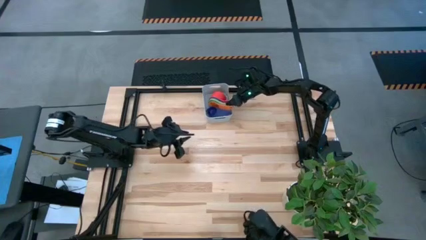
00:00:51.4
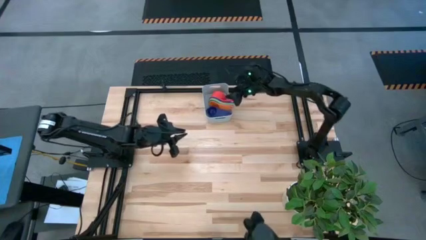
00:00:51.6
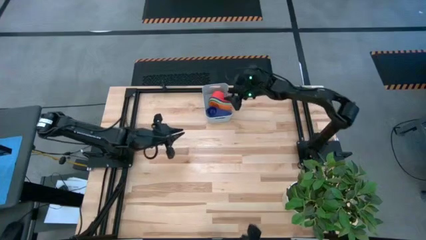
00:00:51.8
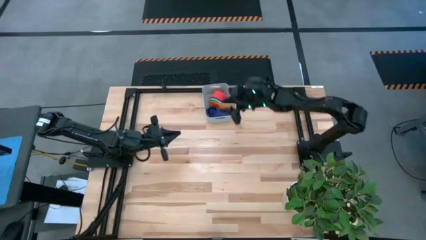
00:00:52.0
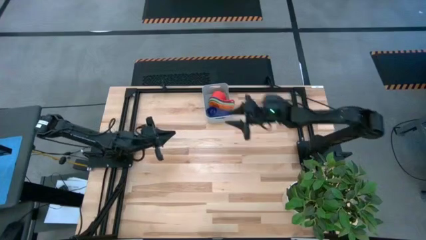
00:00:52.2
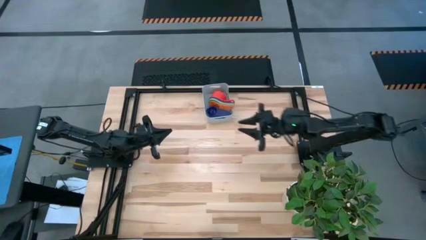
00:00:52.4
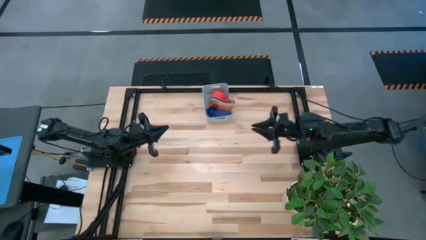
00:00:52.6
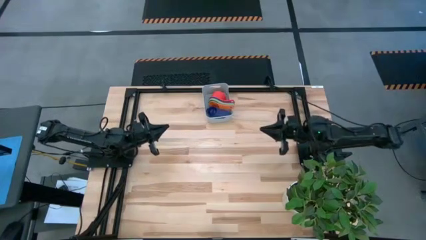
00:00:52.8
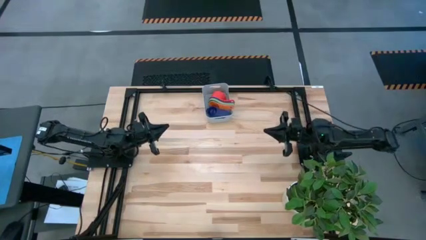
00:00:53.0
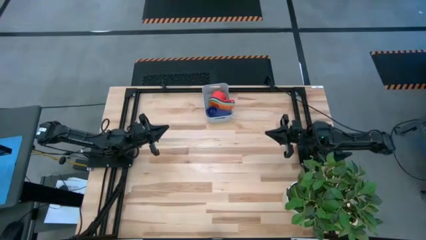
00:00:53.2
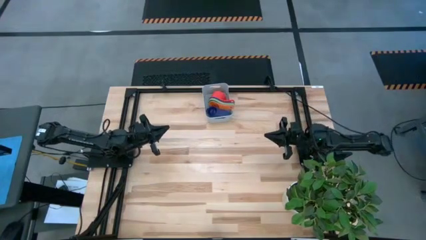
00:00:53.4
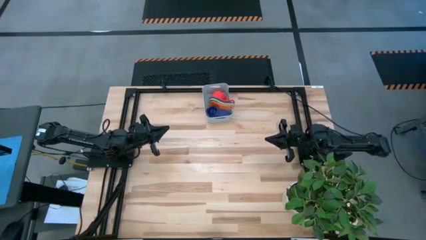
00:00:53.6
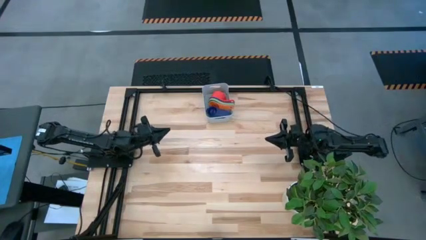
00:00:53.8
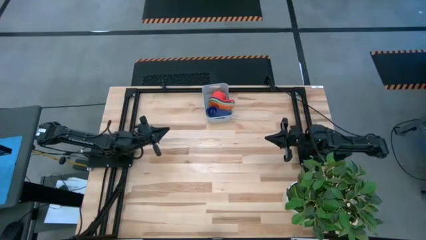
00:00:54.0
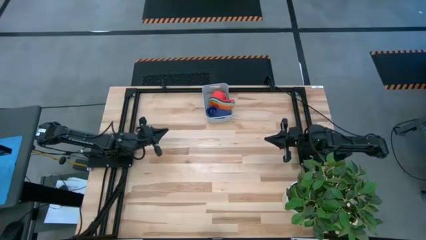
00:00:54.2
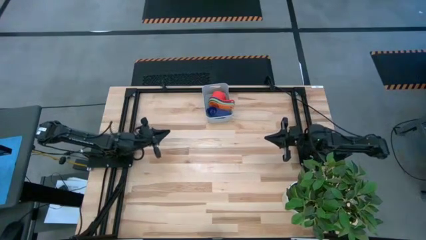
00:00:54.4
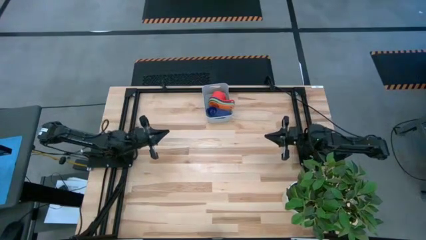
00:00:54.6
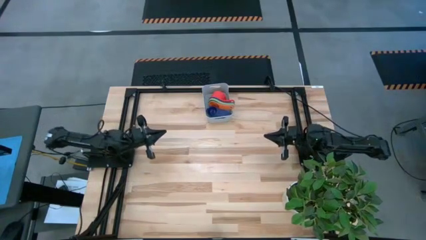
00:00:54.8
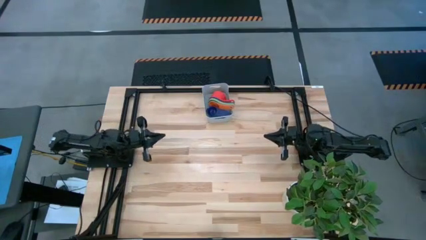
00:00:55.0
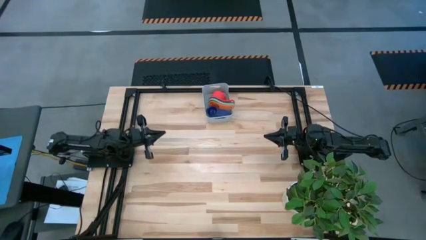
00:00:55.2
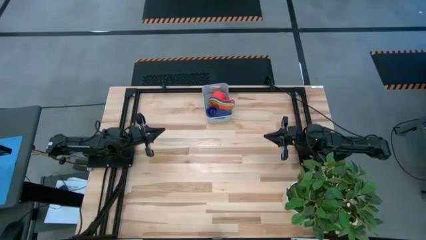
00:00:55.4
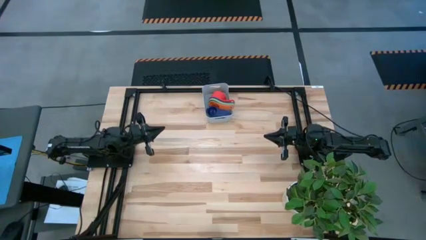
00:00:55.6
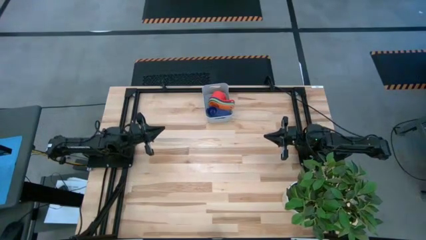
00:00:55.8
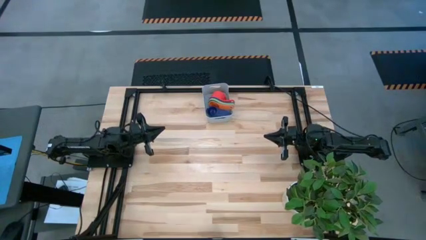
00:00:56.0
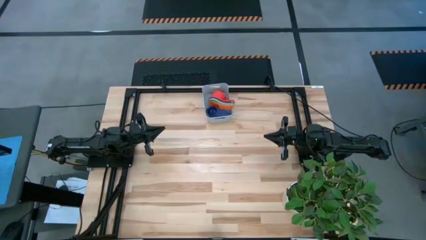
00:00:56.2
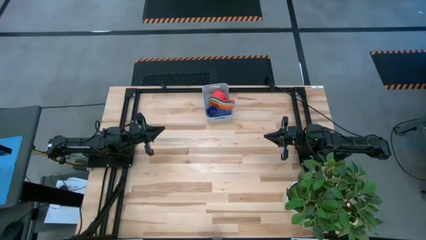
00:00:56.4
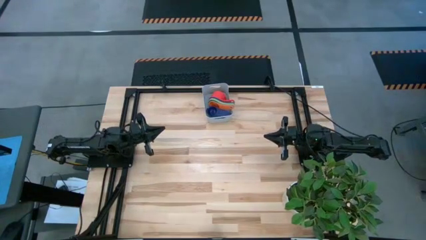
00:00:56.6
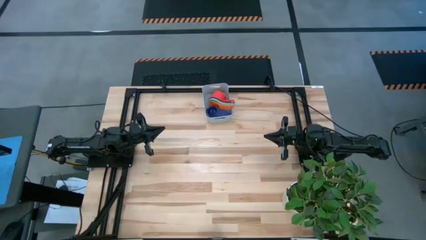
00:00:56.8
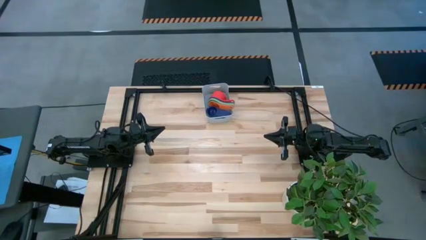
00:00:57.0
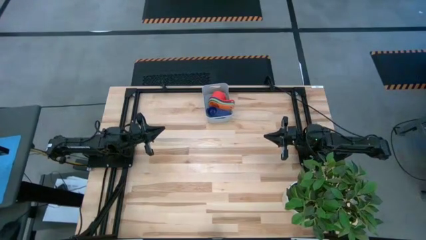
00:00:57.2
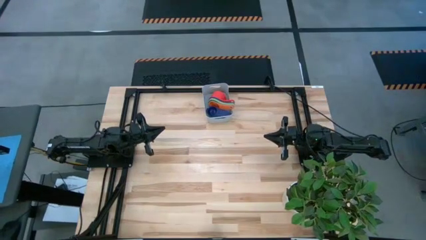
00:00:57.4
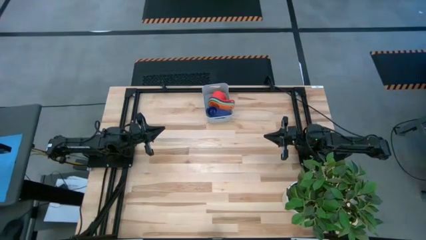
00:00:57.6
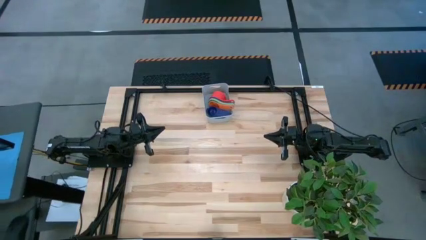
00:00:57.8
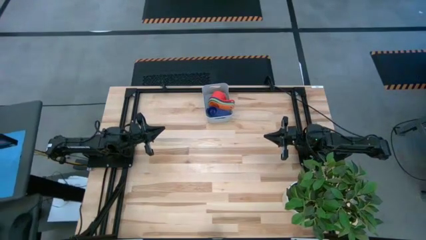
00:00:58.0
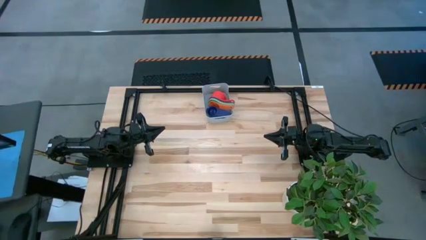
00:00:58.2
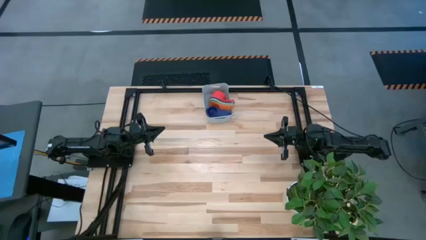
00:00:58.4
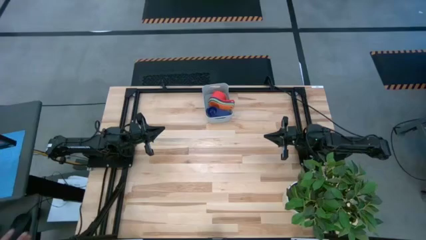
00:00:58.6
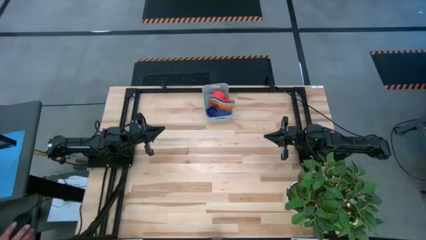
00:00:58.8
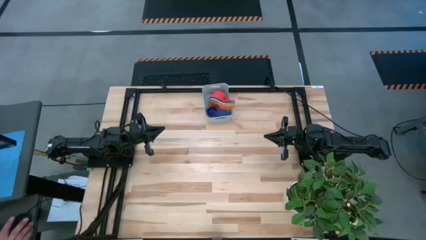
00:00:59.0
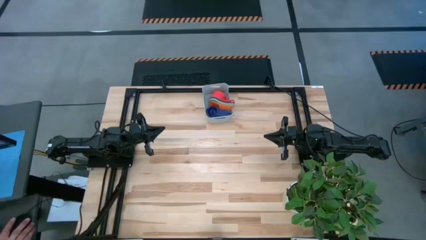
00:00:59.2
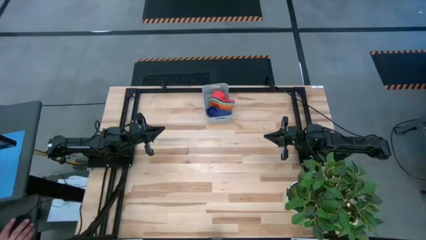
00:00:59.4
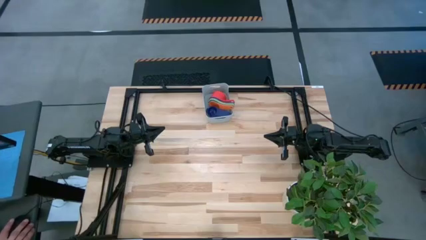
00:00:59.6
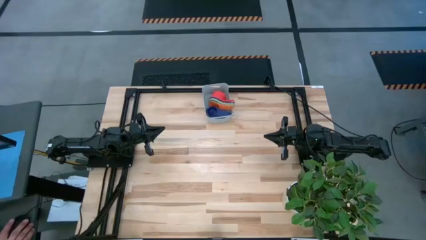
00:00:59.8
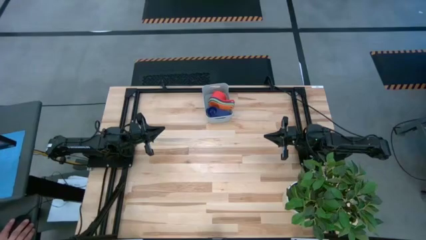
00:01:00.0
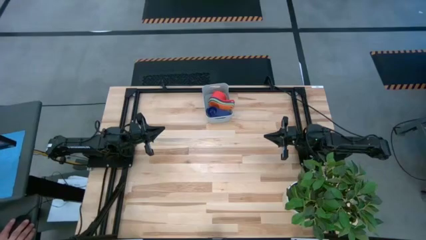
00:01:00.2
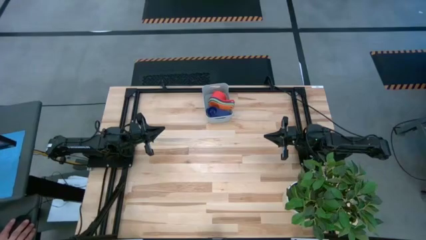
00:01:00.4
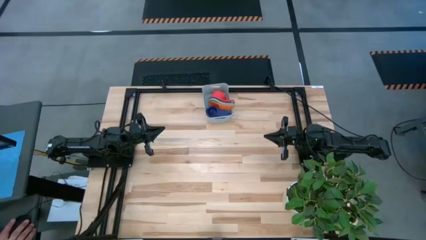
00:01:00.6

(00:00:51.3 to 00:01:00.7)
Task: Nest measuring cups in basket
Return to Home Position

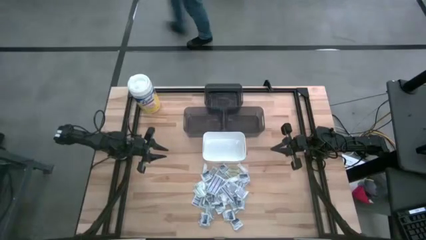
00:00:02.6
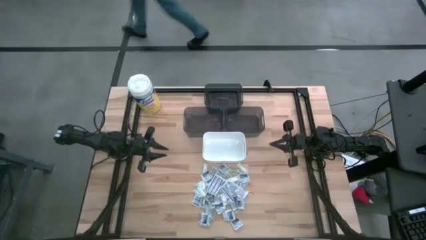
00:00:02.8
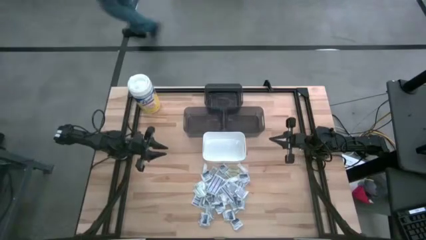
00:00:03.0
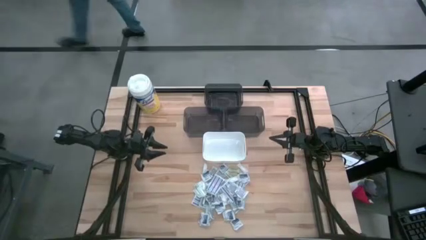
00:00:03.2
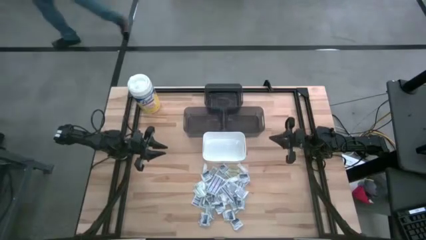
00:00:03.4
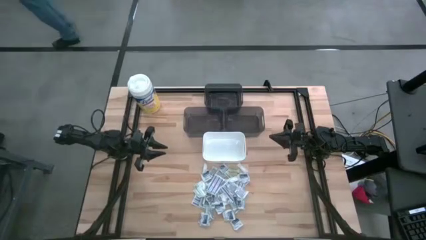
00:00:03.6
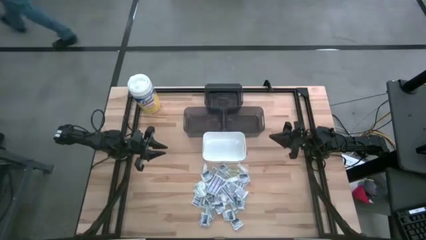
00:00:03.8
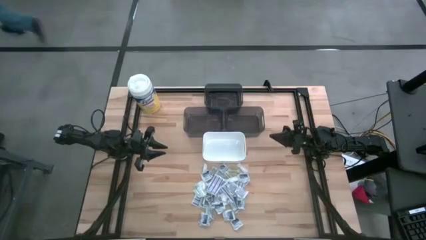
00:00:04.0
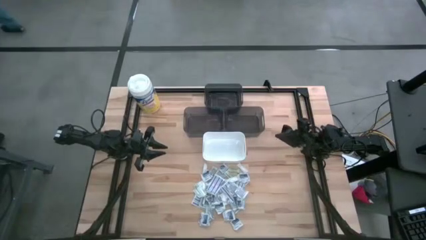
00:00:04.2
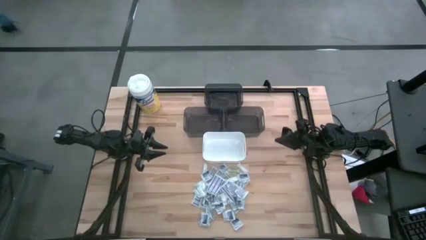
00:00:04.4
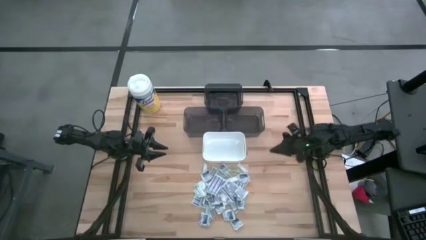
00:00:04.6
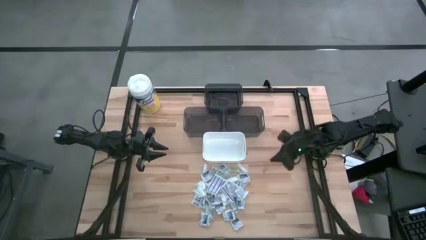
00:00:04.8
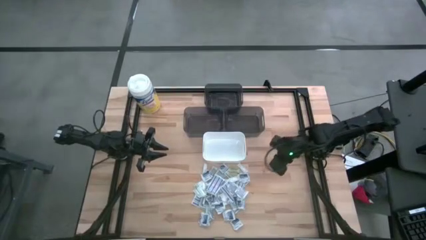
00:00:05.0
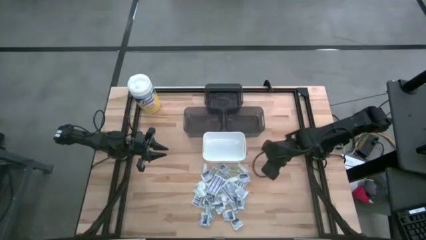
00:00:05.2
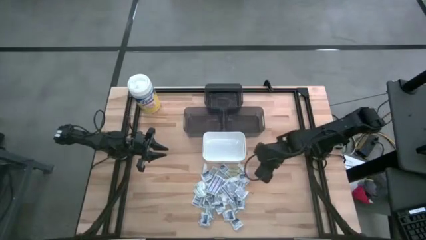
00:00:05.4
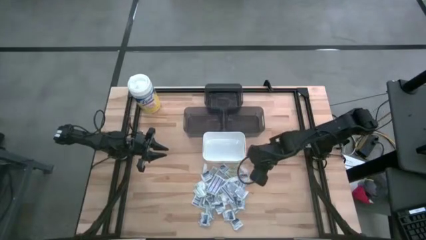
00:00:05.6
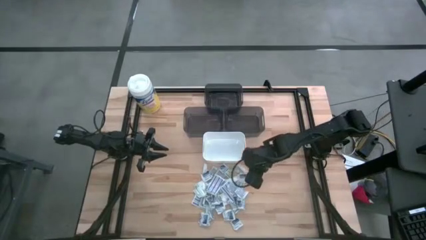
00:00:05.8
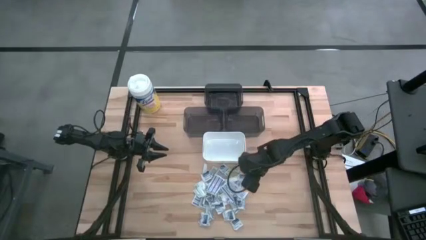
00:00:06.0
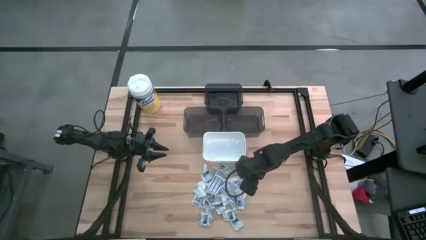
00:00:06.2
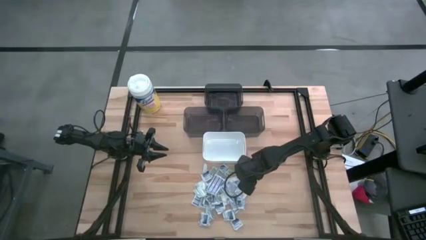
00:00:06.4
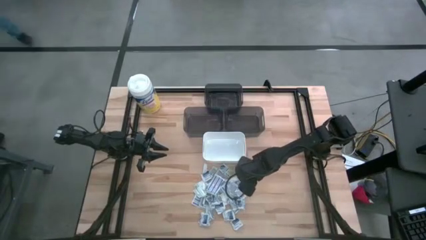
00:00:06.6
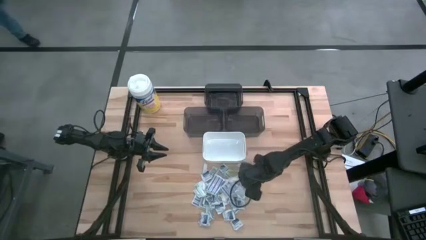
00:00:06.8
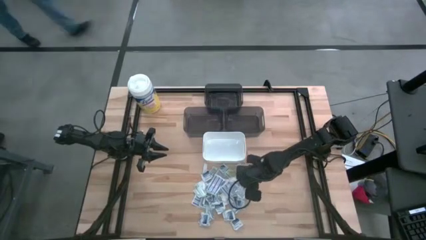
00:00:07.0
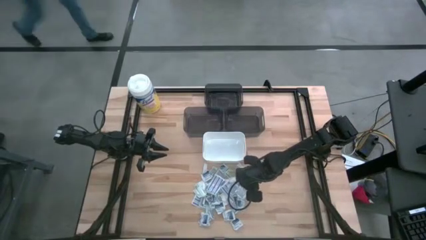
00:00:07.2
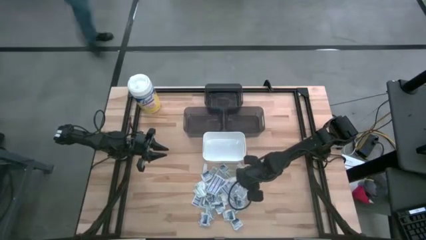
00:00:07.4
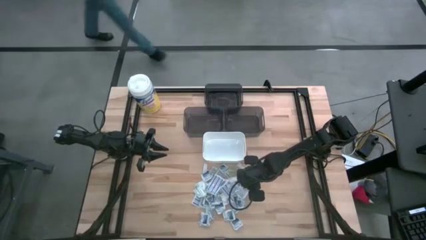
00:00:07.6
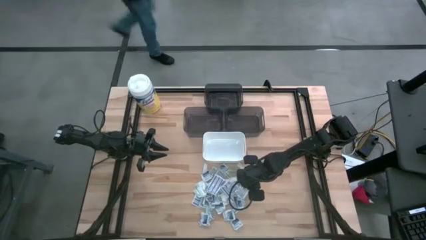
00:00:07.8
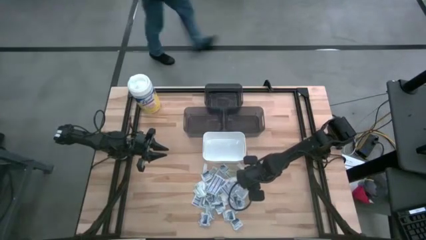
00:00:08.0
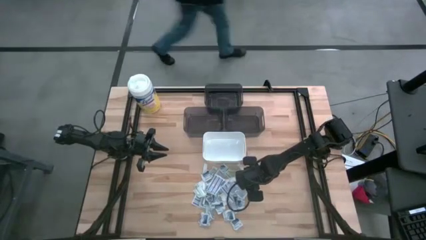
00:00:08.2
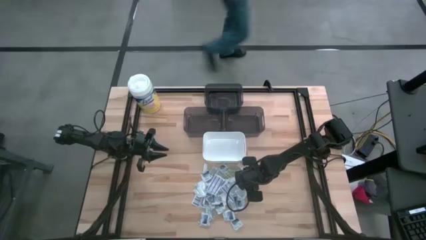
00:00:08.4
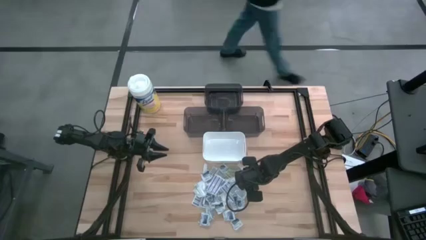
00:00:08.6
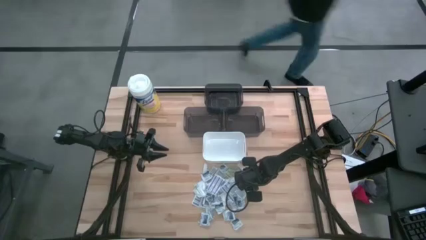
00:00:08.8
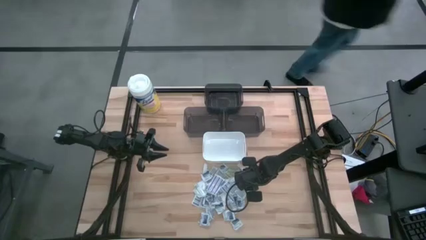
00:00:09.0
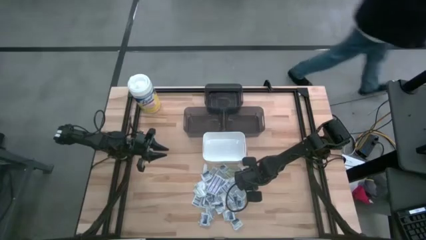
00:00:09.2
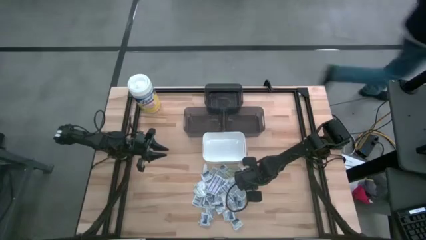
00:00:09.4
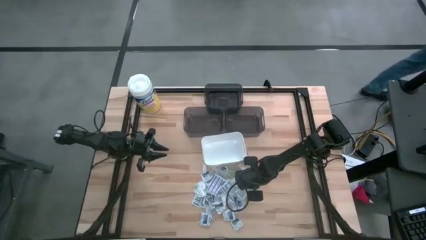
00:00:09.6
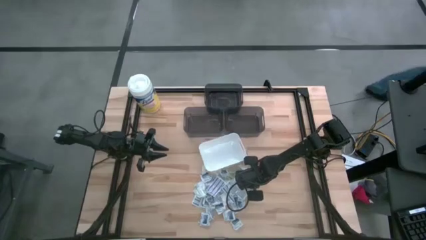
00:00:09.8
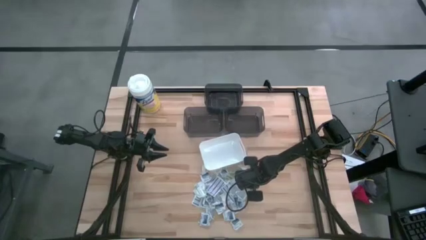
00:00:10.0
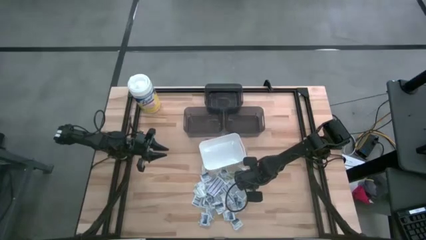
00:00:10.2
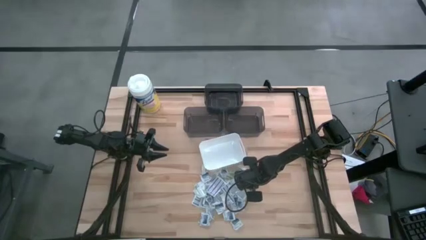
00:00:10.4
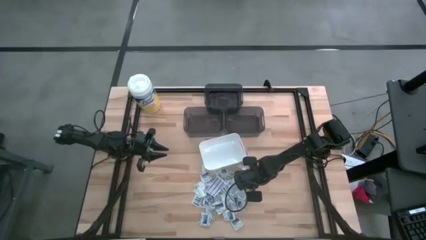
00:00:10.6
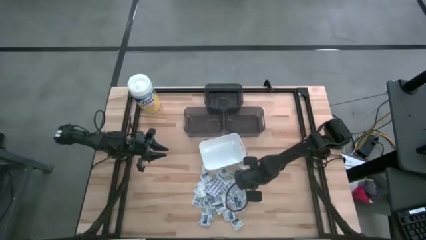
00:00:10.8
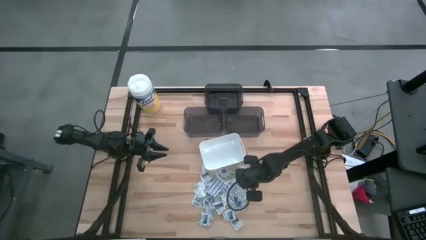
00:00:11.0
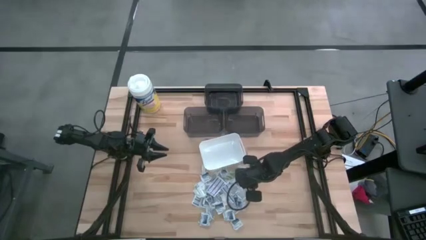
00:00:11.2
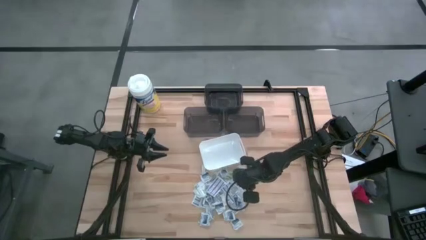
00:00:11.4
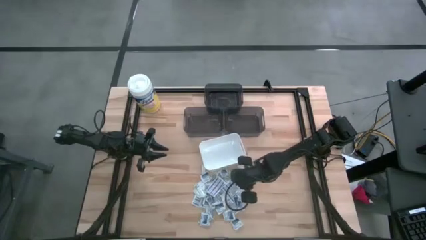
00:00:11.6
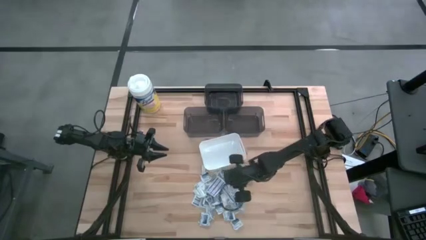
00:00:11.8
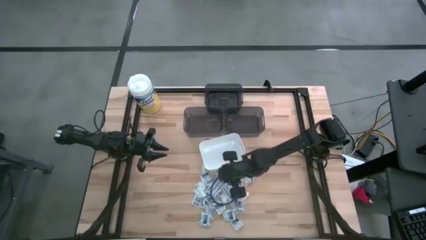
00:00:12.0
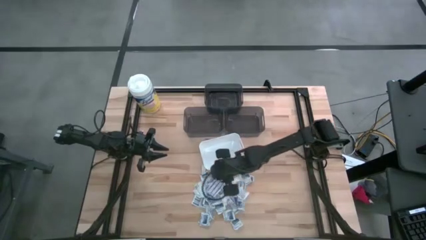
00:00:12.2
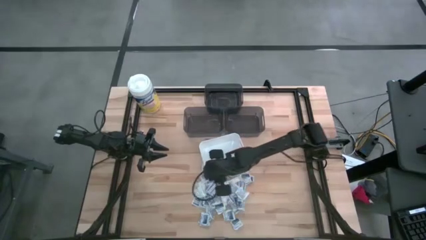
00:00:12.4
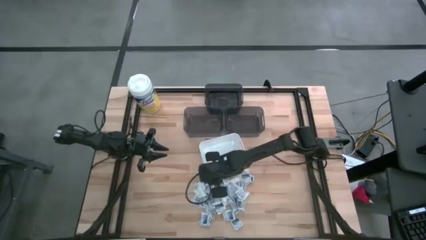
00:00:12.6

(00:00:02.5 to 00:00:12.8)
Task: Pick & Place First Aid Supplies
Put the green bandage into the top black bin
